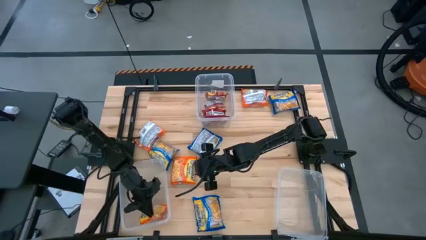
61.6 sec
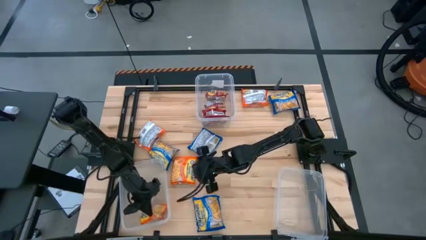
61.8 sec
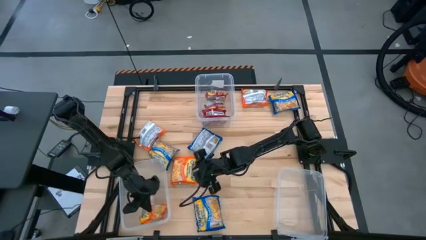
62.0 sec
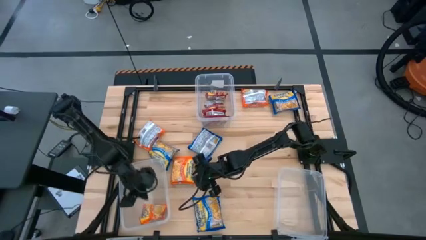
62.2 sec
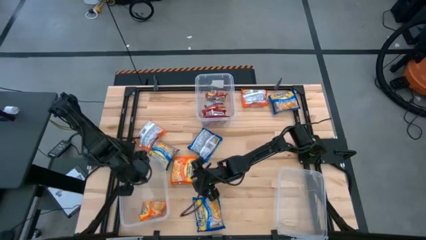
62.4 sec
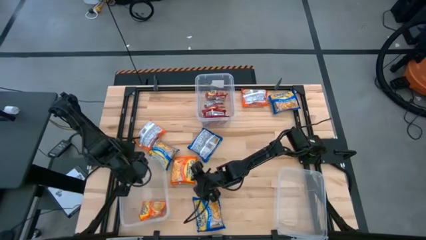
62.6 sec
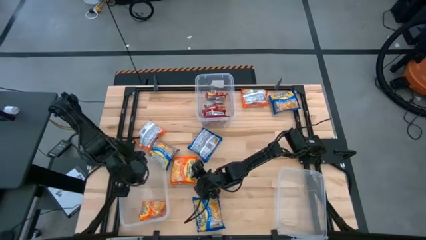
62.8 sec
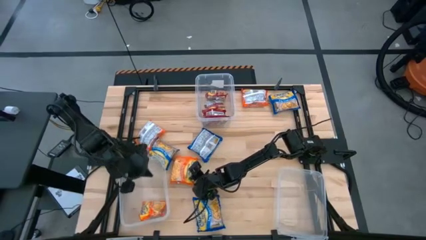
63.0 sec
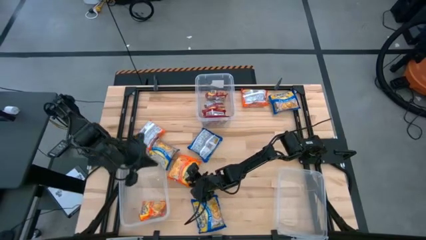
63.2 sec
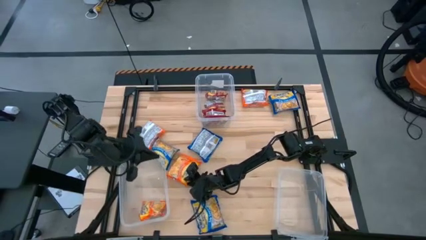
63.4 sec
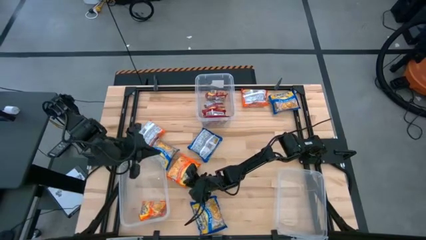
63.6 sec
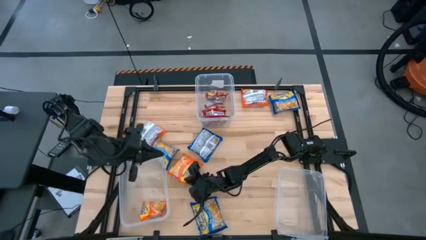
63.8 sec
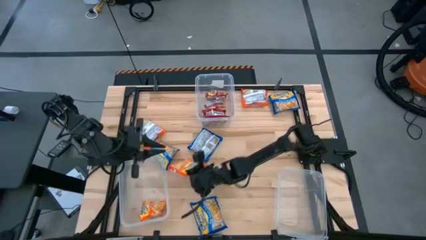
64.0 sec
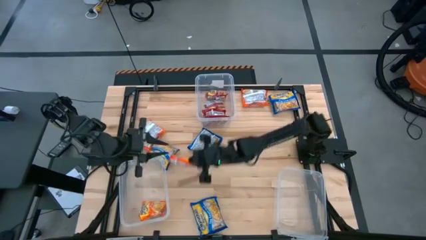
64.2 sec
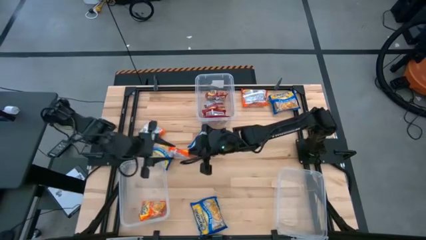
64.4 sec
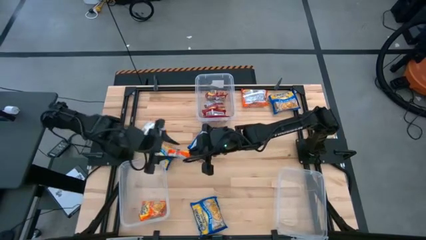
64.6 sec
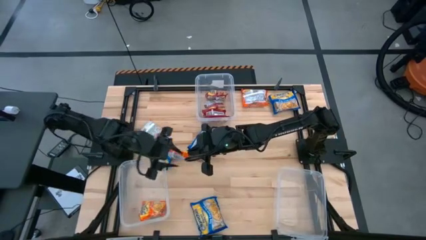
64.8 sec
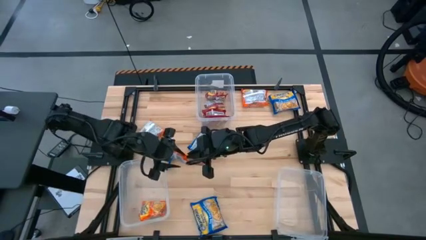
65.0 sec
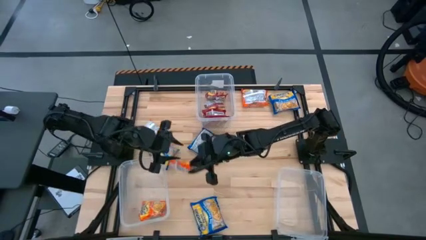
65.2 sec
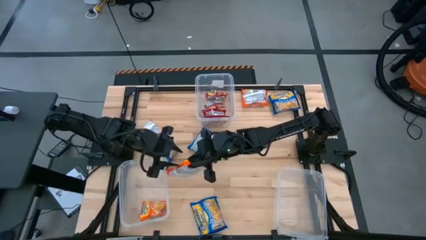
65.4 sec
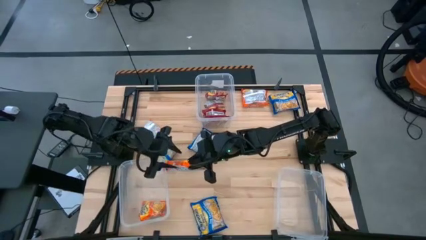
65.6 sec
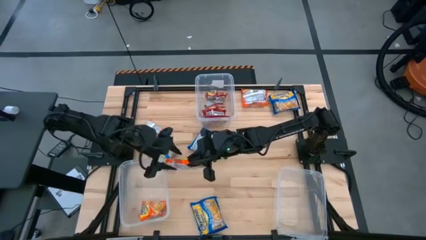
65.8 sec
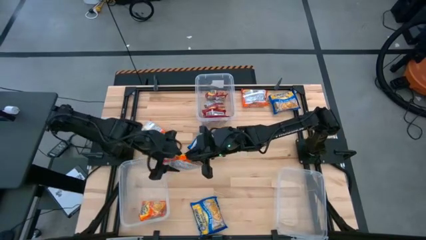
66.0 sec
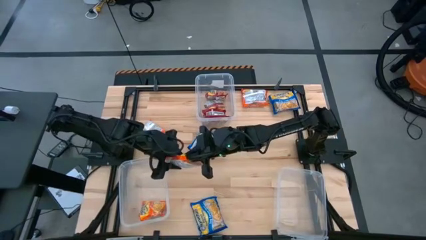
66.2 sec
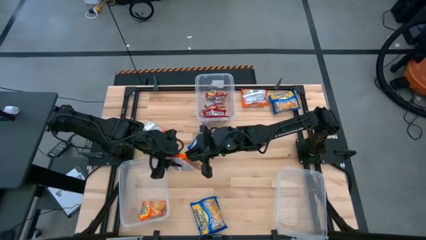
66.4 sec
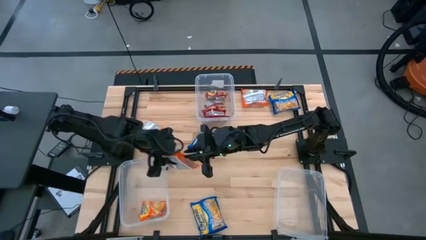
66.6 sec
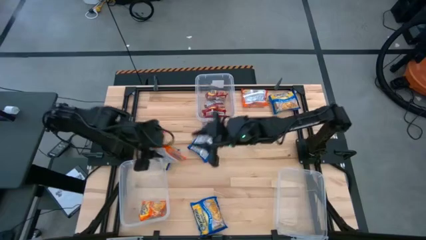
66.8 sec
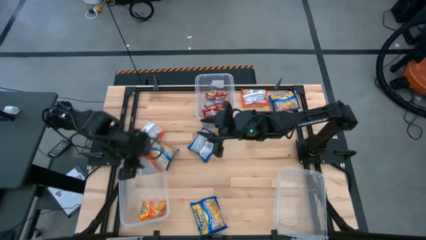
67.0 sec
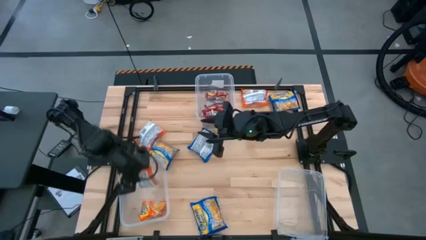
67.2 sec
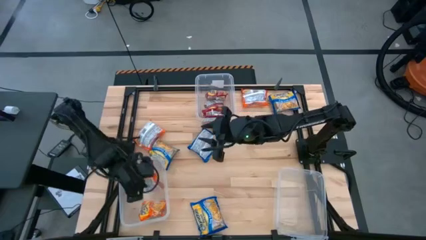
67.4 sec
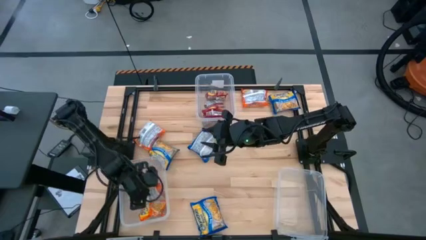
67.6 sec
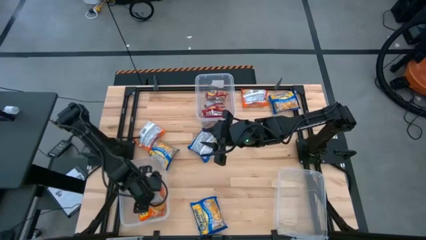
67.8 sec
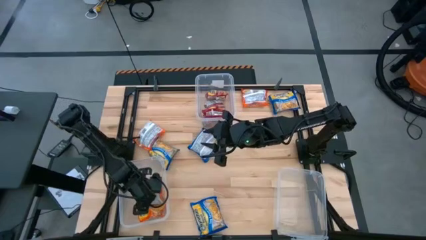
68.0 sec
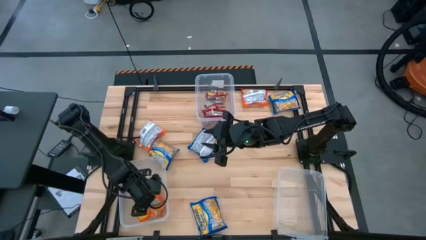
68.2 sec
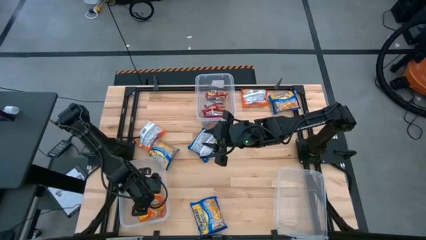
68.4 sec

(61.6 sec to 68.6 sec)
Task: Sort Maruchan noodles
Put the orange noodle pack into the bottom left transparent bin

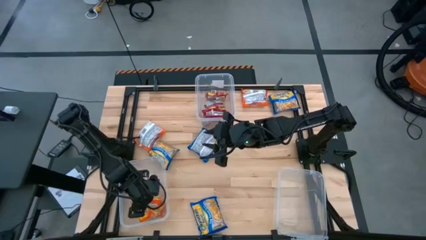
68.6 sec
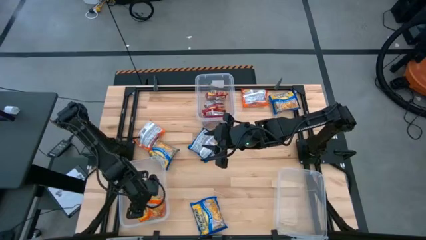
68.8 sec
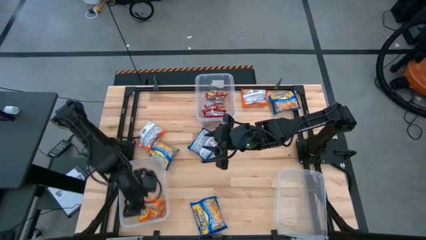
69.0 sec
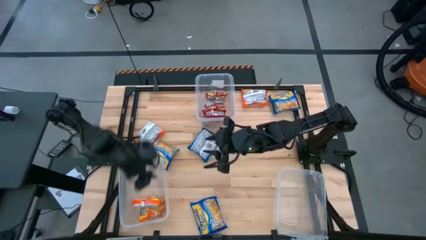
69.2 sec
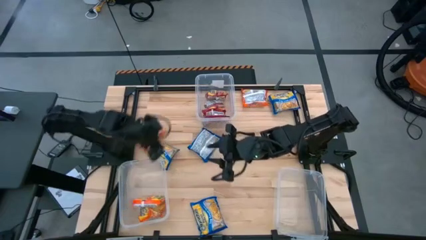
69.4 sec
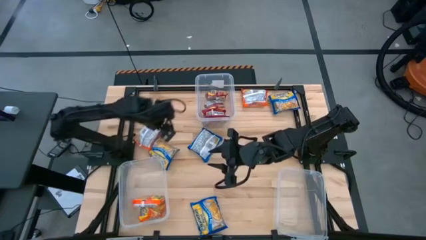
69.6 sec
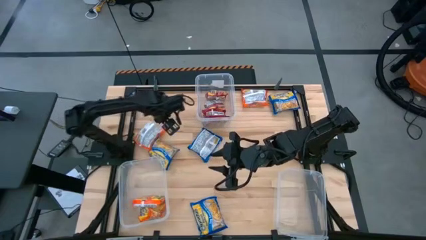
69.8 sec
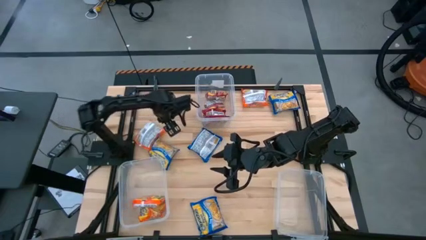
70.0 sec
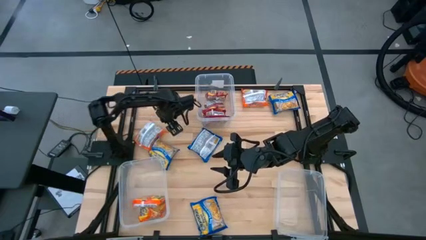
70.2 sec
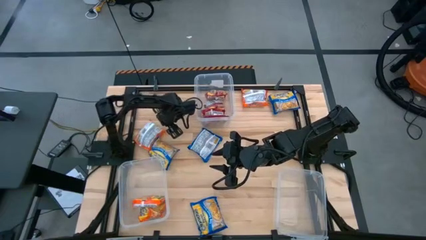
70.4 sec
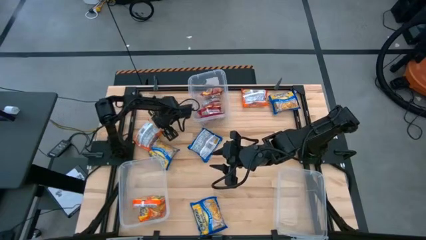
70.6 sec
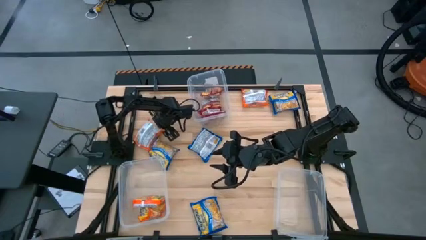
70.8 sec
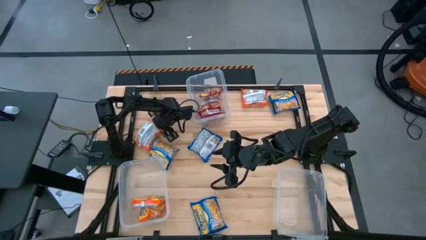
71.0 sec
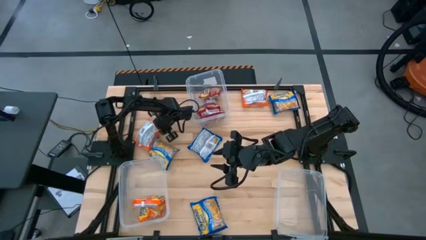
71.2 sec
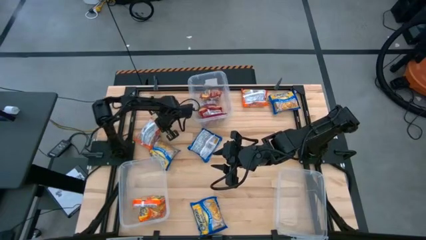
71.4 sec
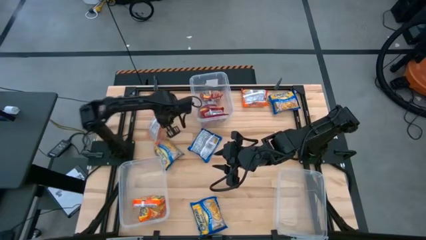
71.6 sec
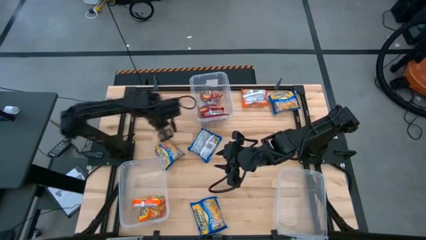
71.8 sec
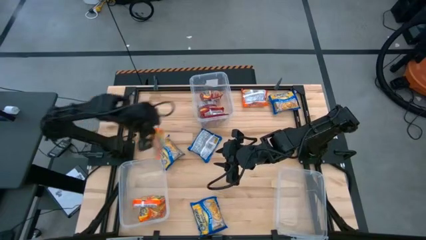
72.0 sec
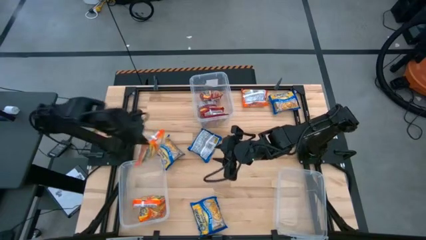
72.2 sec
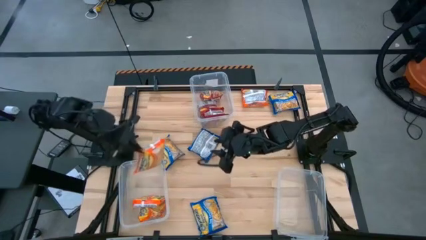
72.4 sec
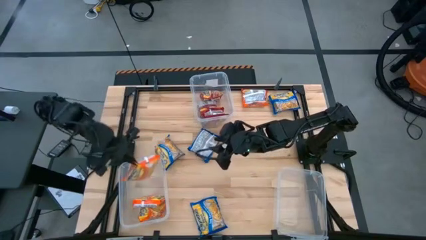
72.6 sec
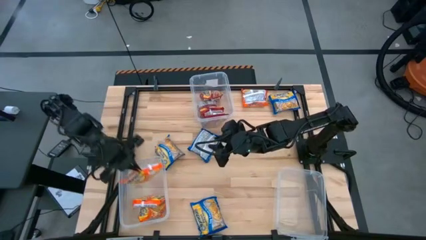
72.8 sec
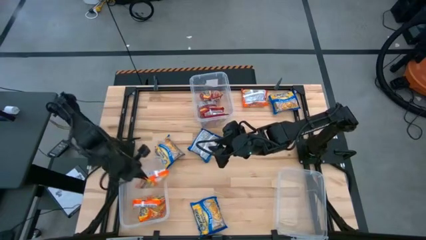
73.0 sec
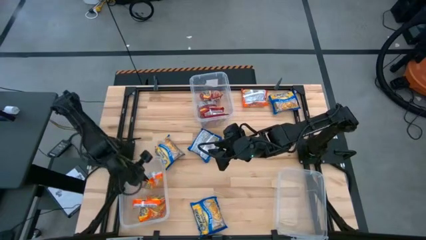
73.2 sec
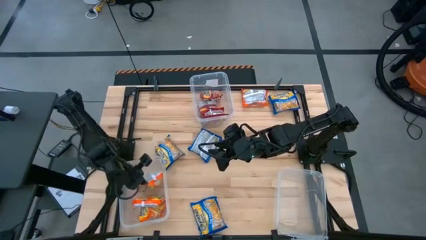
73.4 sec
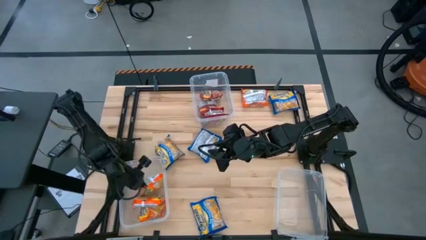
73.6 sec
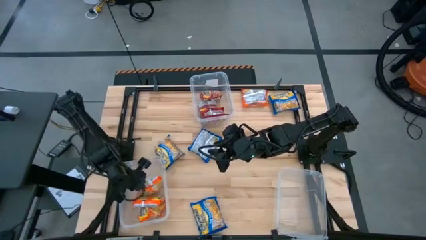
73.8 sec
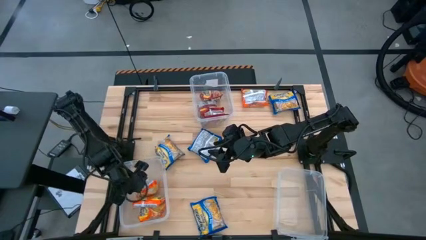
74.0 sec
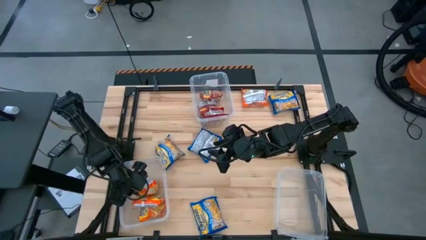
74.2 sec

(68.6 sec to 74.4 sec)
Put the orange noodle pack into the bottom left transparent bin
